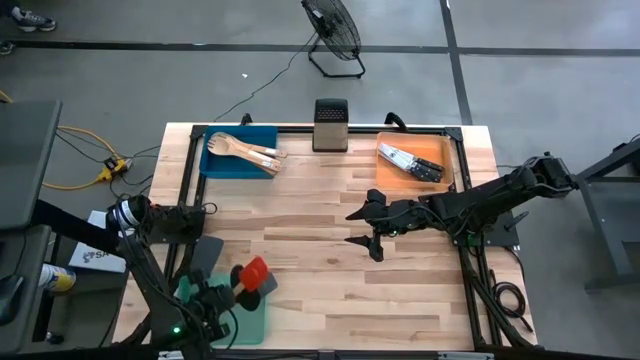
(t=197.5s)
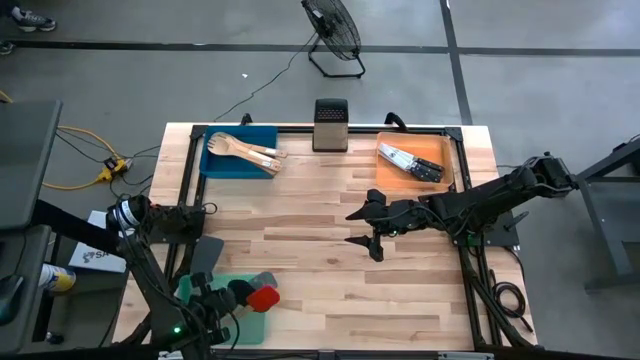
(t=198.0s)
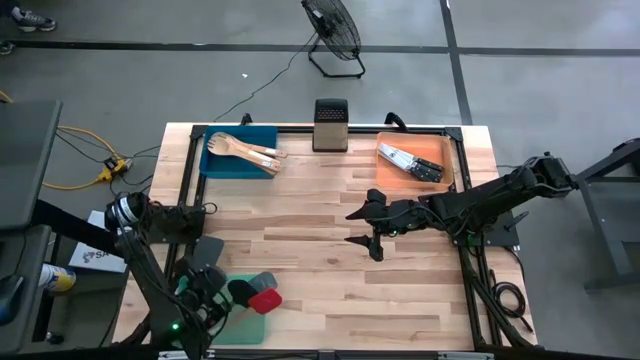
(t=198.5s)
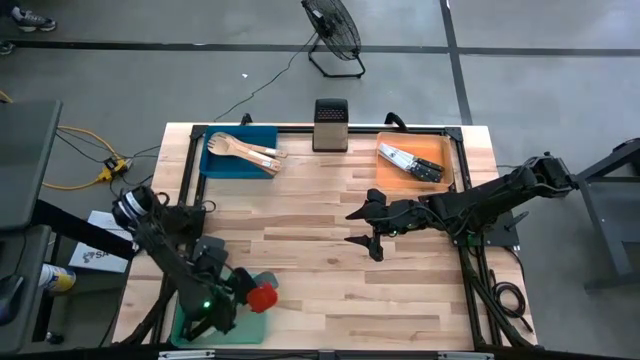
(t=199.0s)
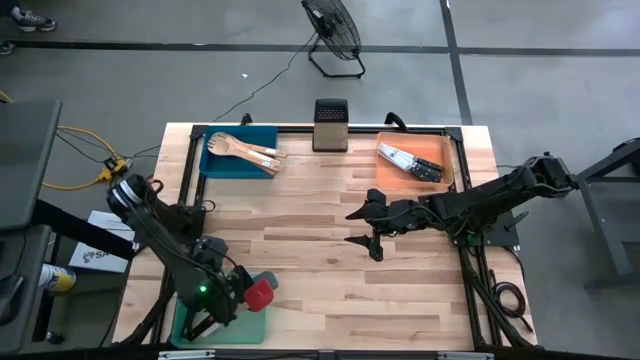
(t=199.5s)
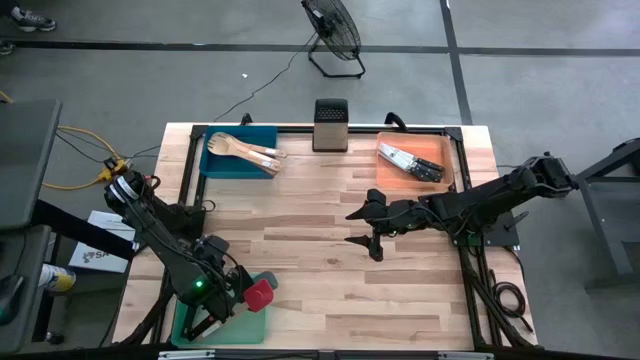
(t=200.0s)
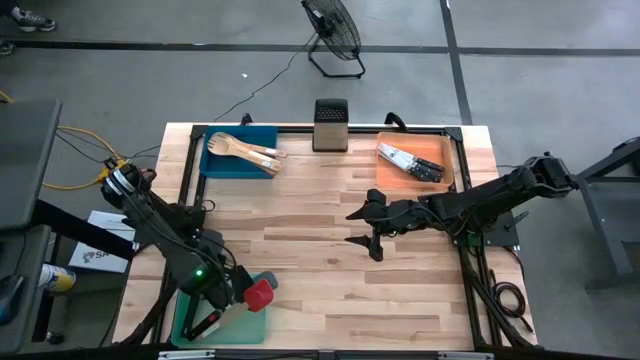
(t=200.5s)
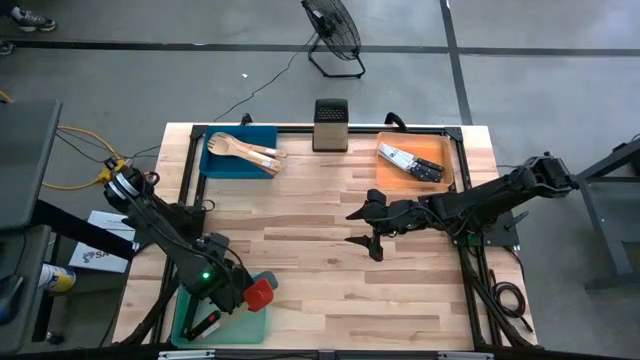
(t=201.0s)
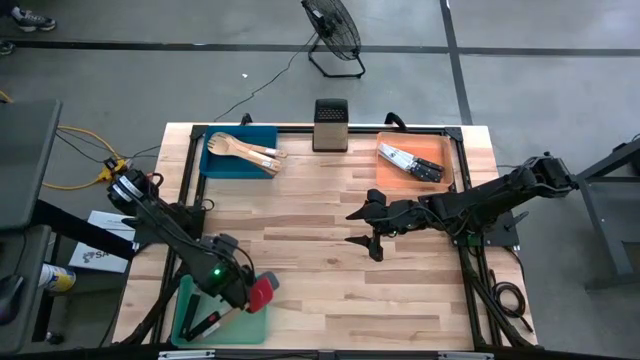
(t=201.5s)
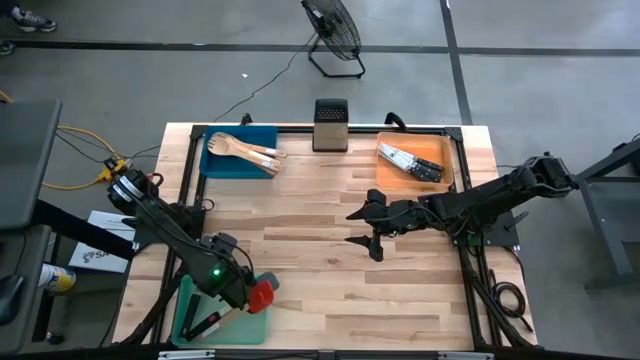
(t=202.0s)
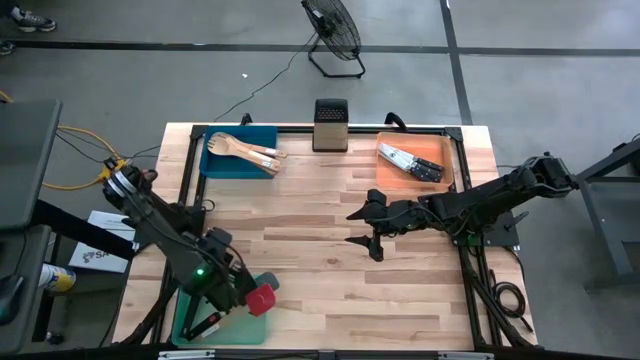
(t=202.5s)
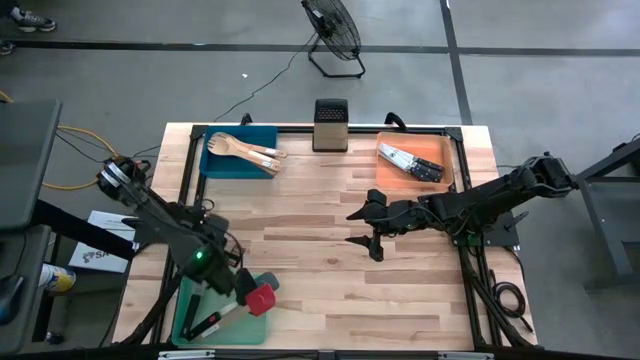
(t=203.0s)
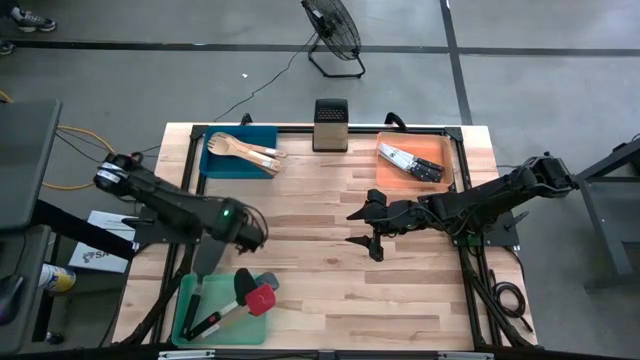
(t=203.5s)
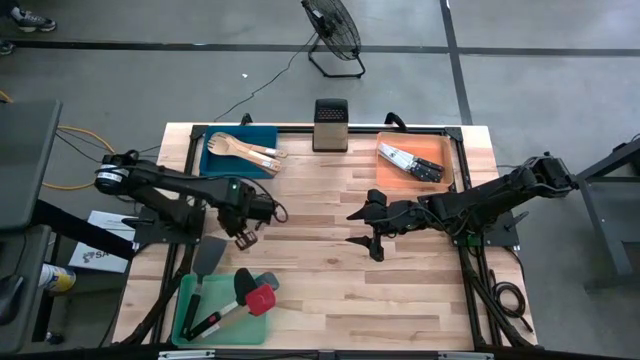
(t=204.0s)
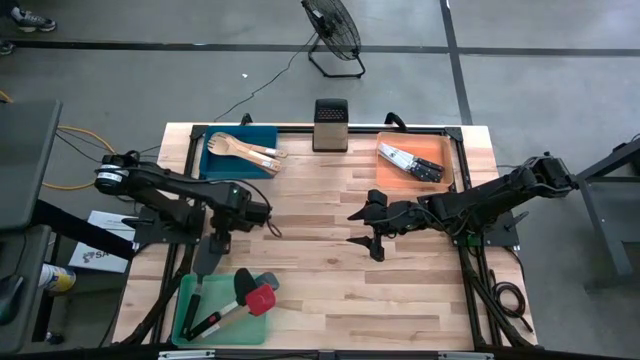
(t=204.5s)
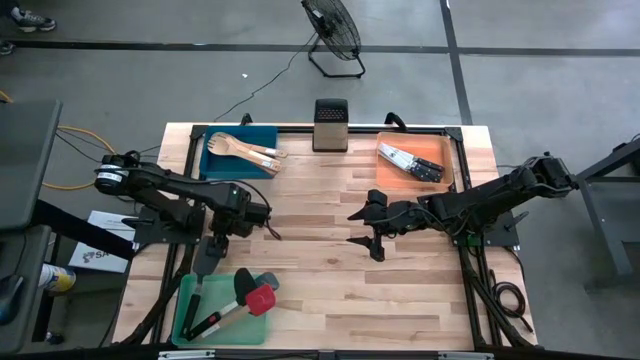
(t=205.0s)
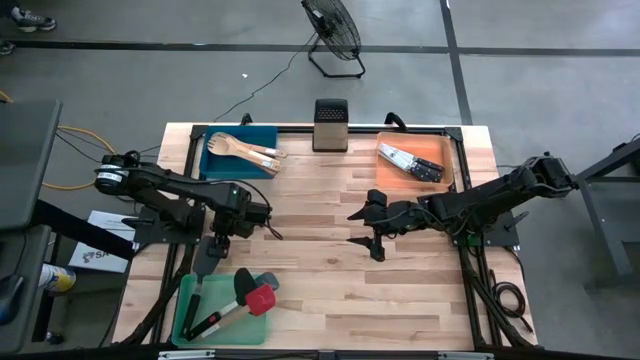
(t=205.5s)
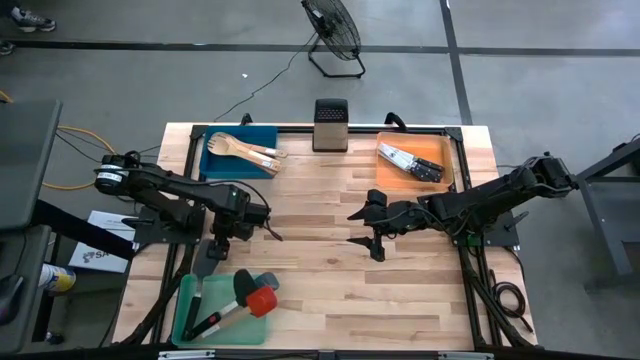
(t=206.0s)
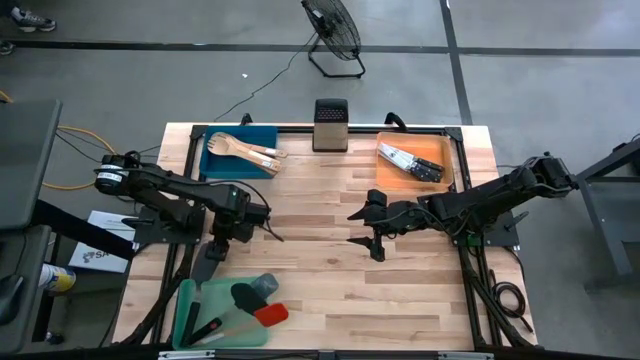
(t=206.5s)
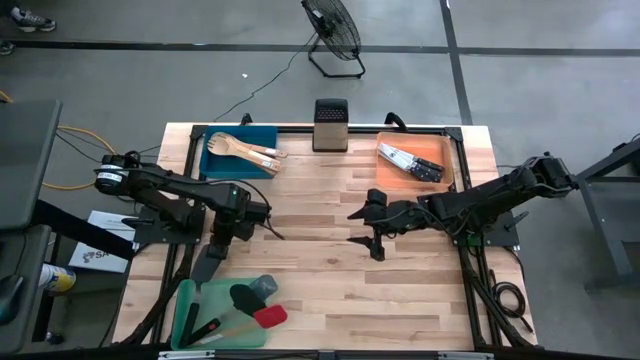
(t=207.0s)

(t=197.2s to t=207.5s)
Task: Pick & Place Kitchen Items
Adjust the spatulas in the green bin

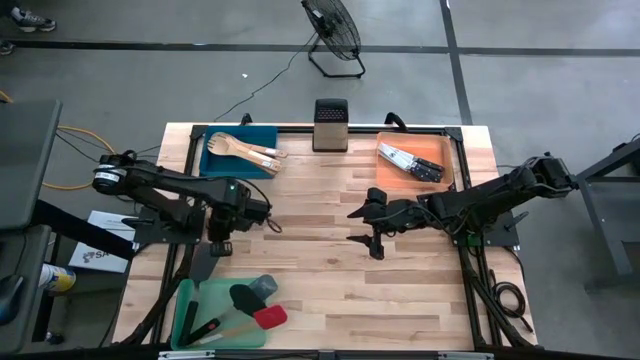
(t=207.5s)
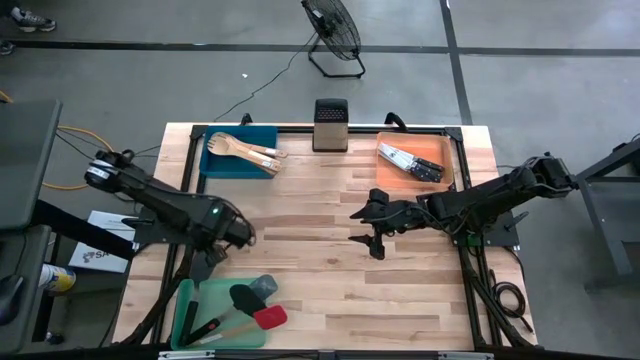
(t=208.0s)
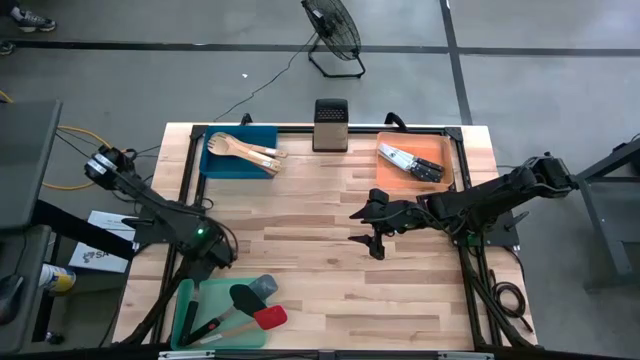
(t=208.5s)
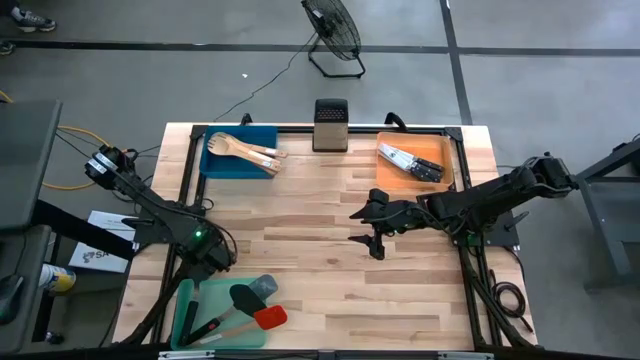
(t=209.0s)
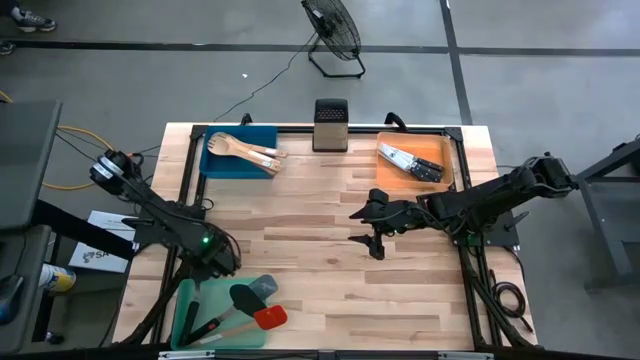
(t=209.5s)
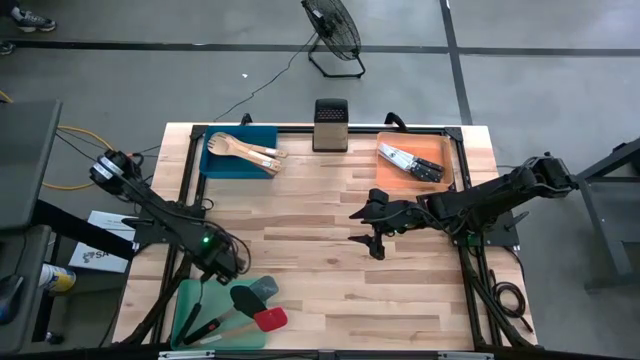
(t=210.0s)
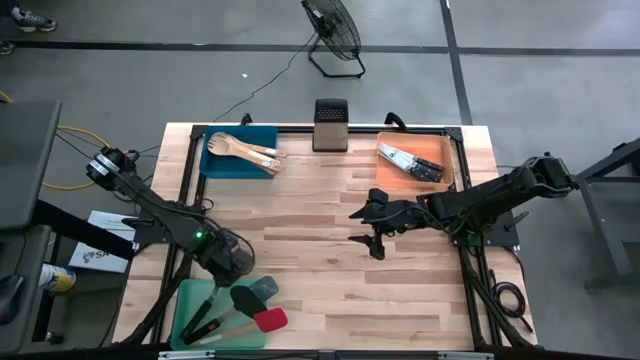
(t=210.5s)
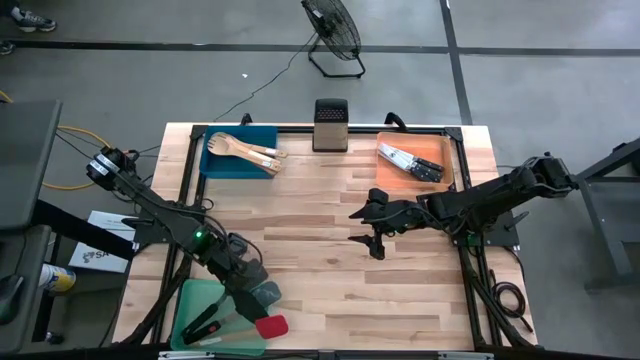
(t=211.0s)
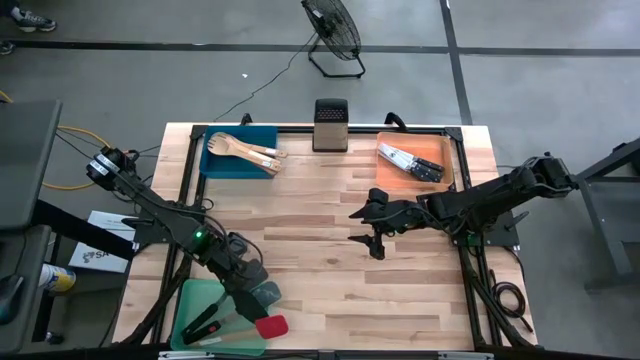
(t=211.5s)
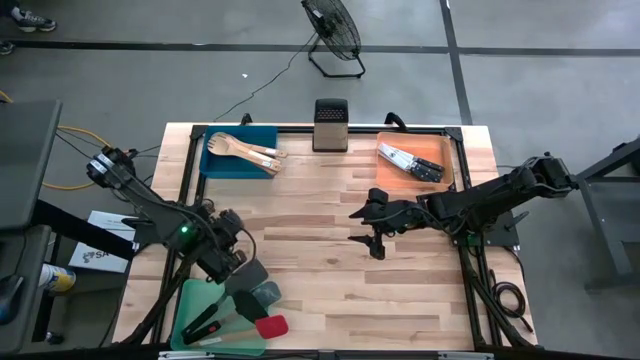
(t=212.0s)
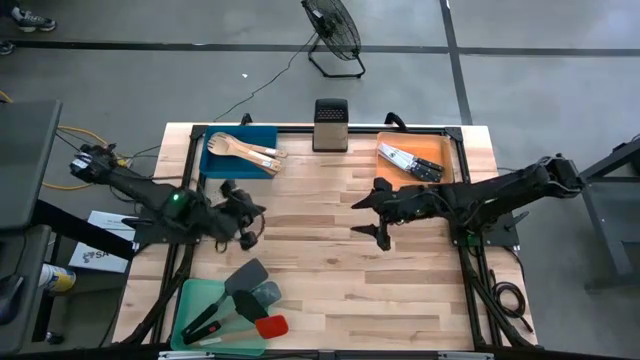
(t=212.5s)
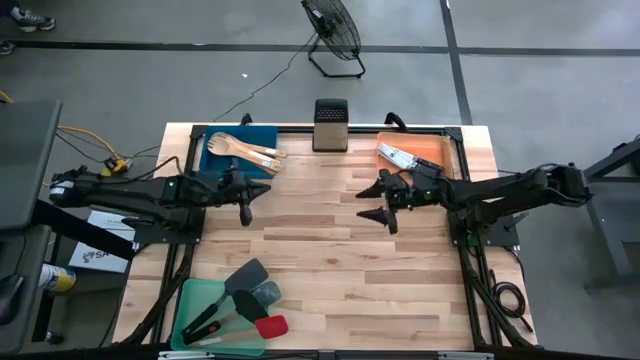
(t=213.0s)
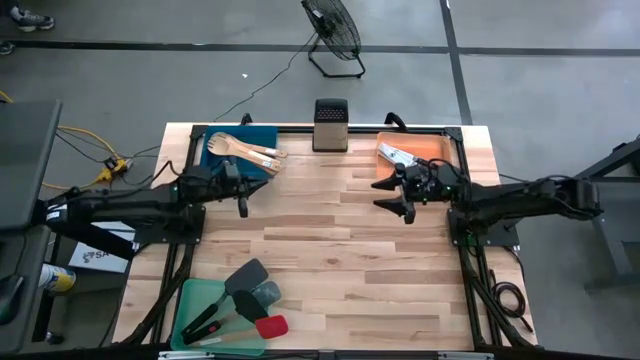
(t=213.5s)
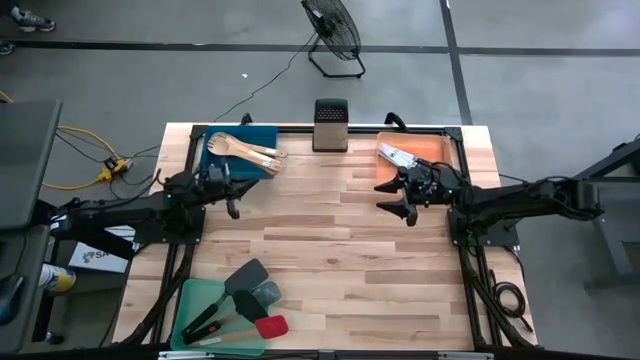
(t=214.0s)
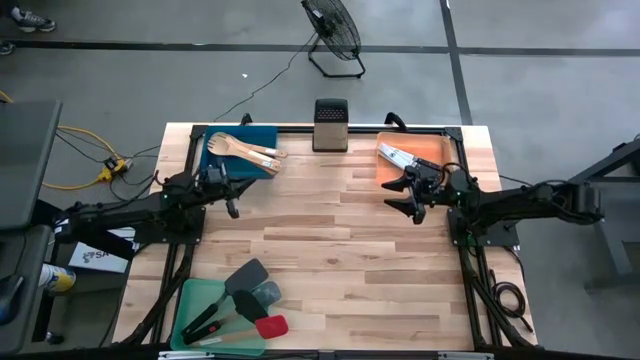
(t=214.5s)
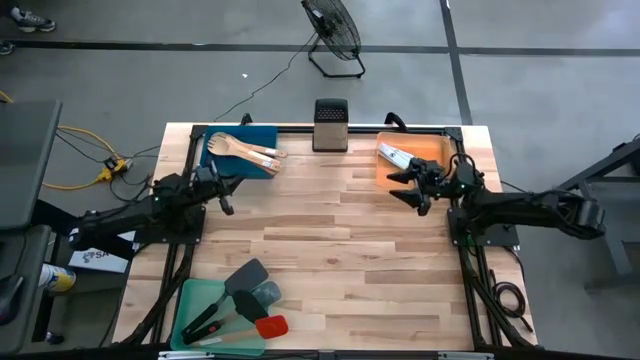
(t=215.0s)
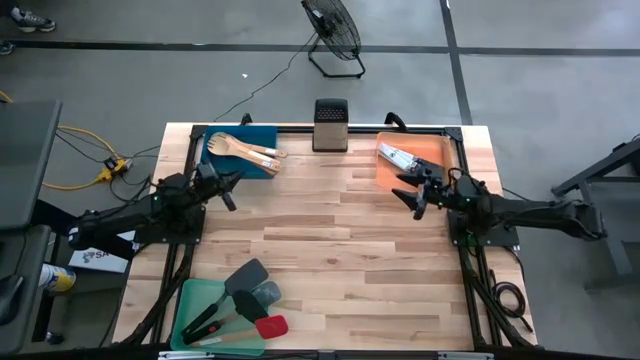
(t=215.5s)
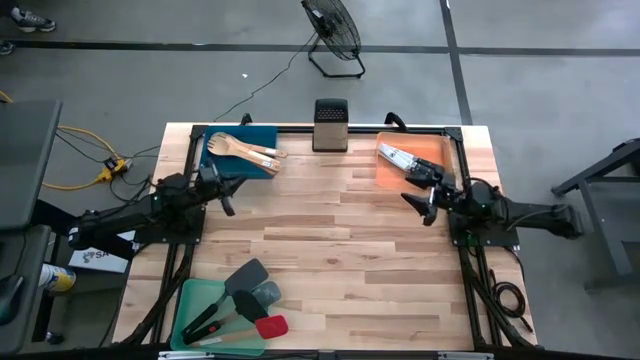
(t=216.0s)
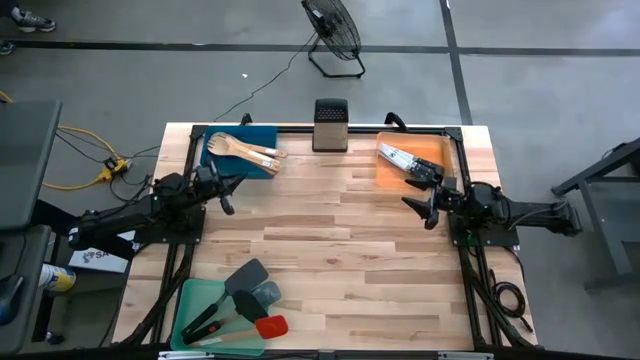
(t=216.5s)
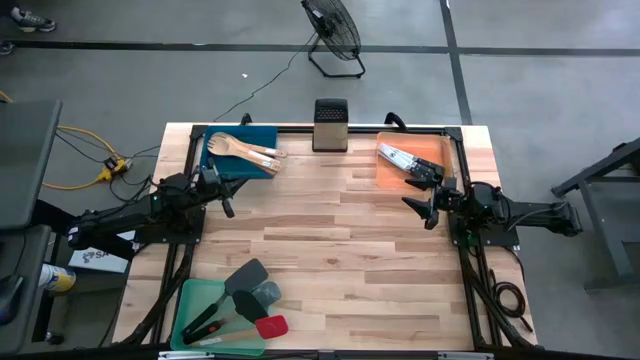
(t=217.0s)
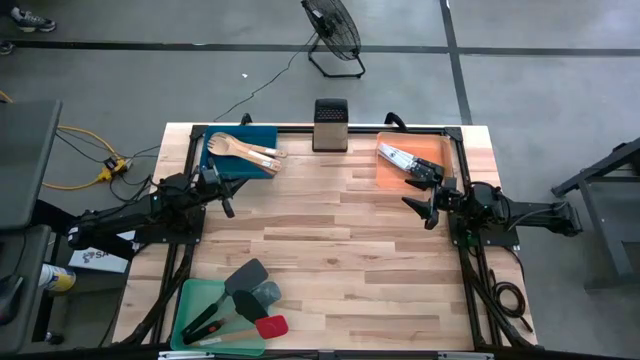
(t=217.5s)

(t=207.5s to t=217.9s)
Return to Home Position
